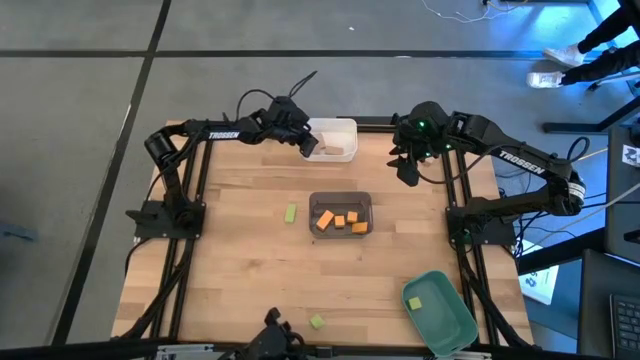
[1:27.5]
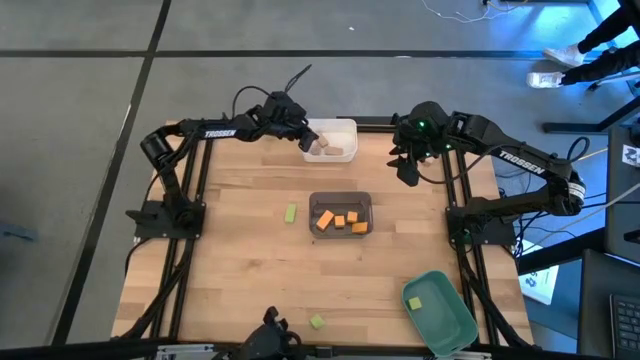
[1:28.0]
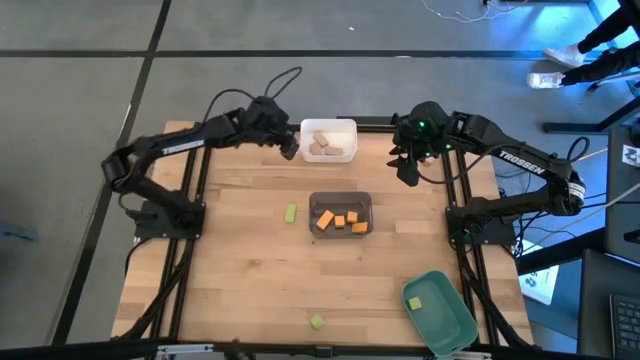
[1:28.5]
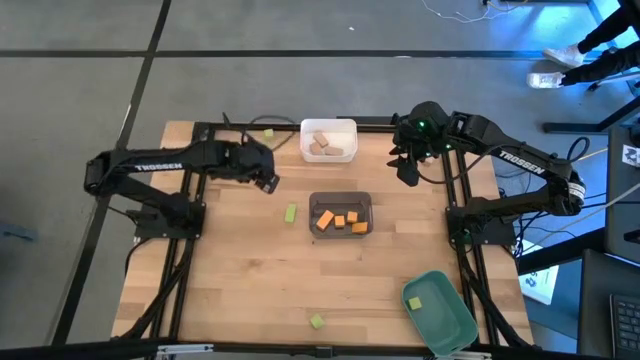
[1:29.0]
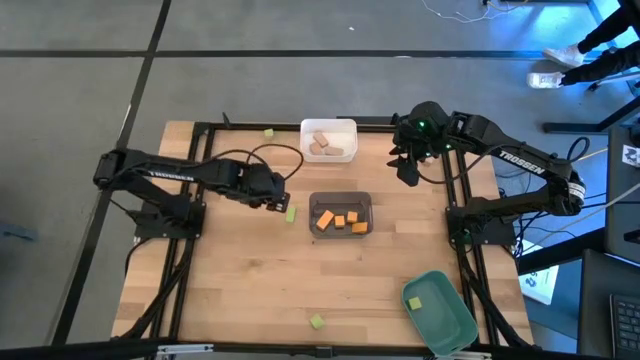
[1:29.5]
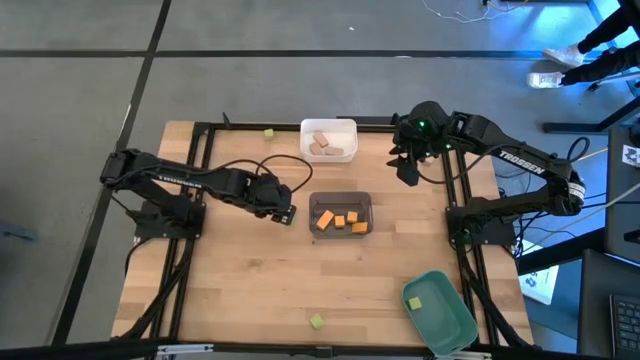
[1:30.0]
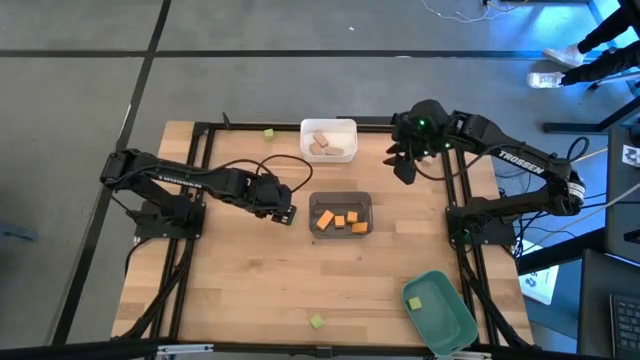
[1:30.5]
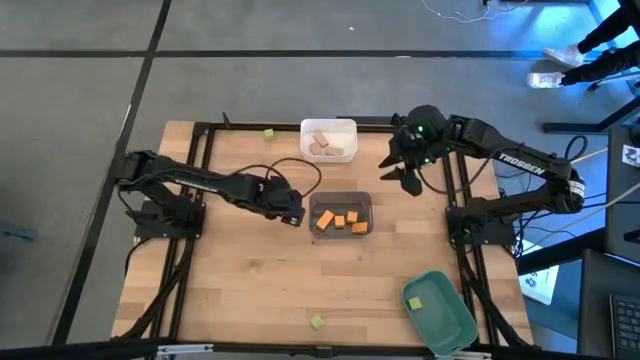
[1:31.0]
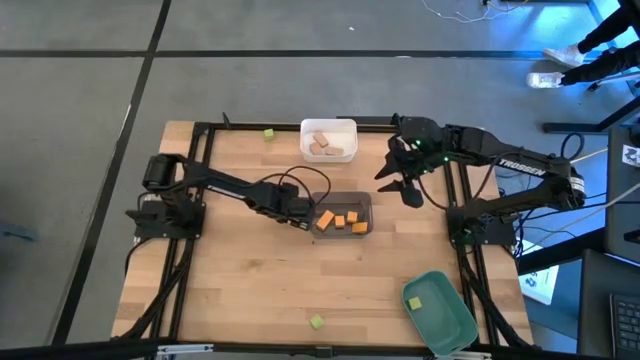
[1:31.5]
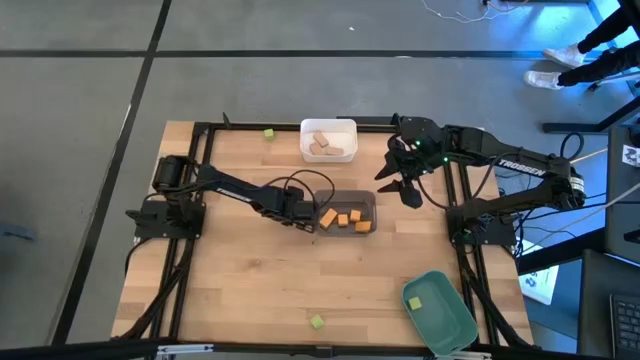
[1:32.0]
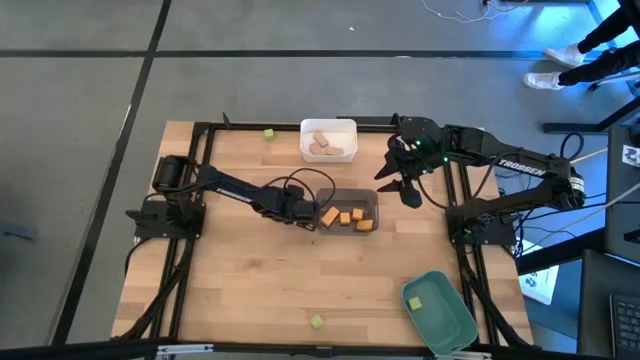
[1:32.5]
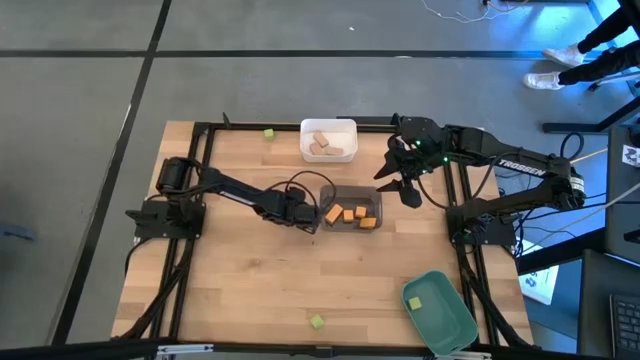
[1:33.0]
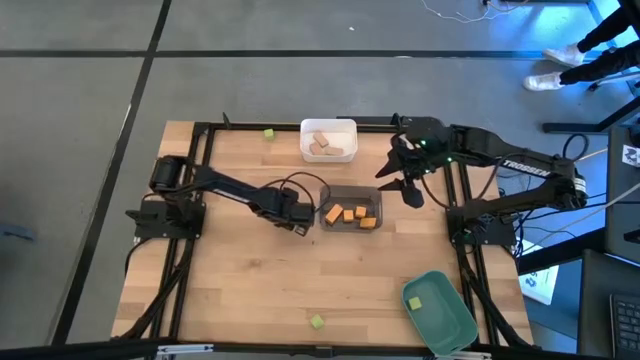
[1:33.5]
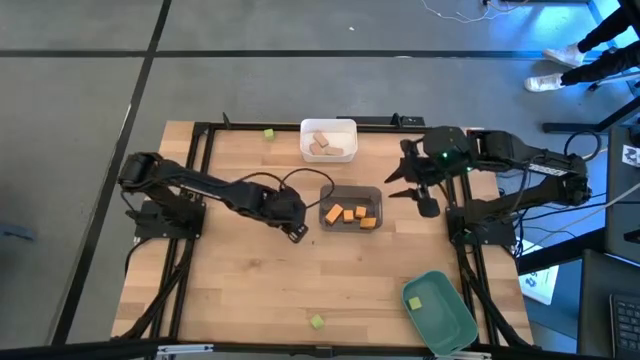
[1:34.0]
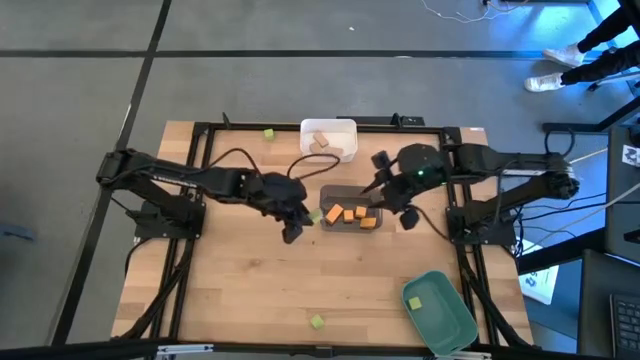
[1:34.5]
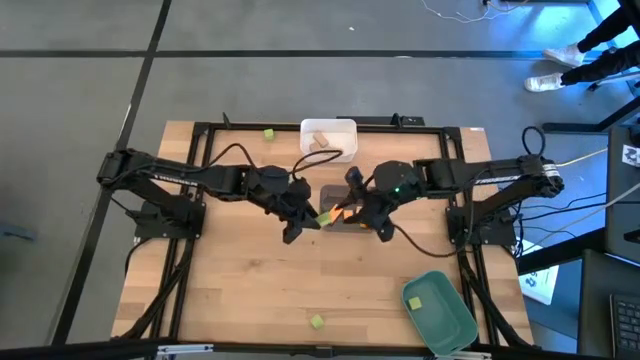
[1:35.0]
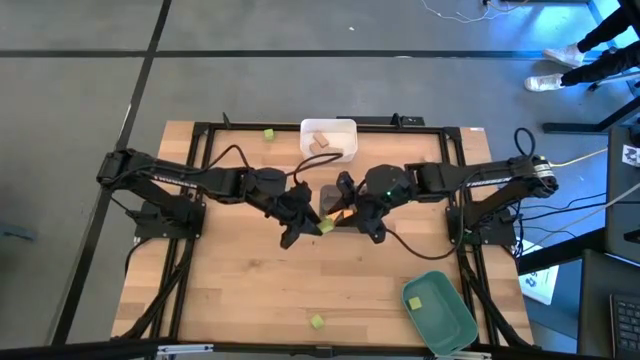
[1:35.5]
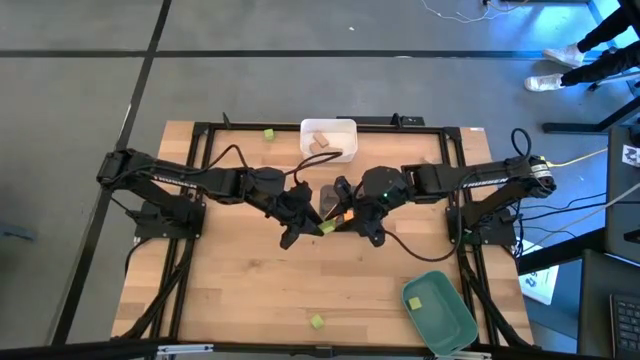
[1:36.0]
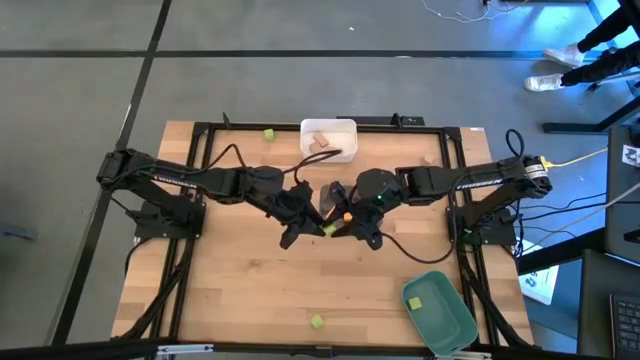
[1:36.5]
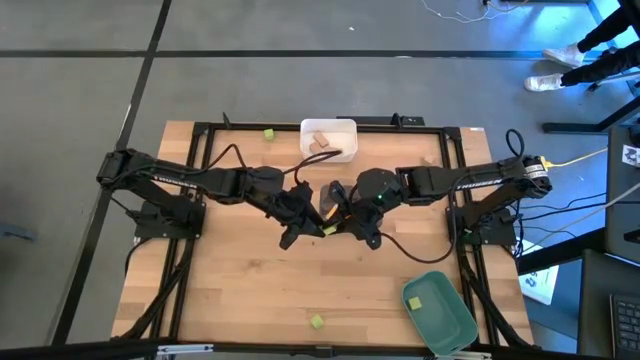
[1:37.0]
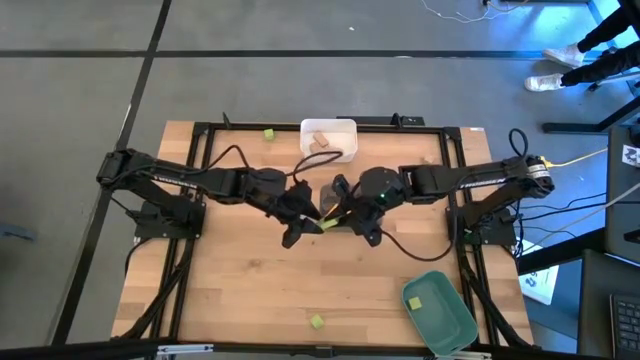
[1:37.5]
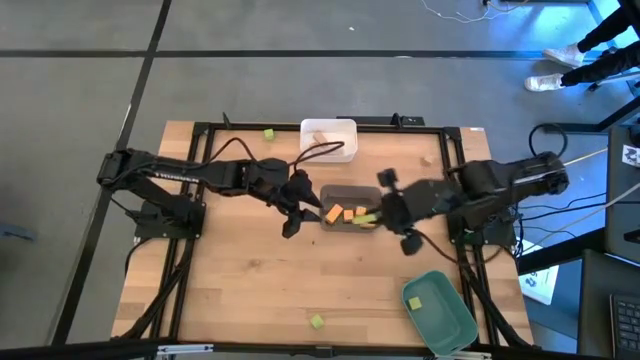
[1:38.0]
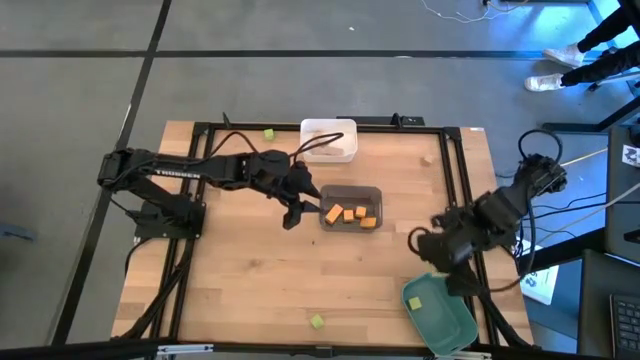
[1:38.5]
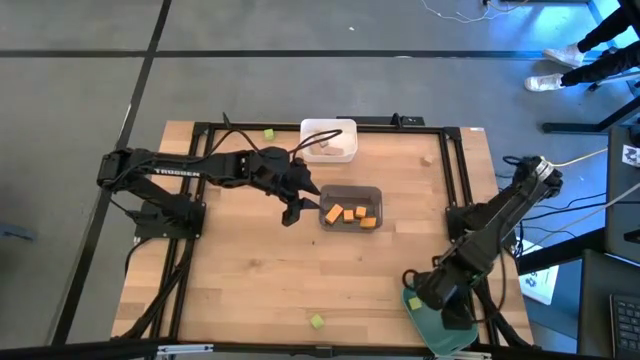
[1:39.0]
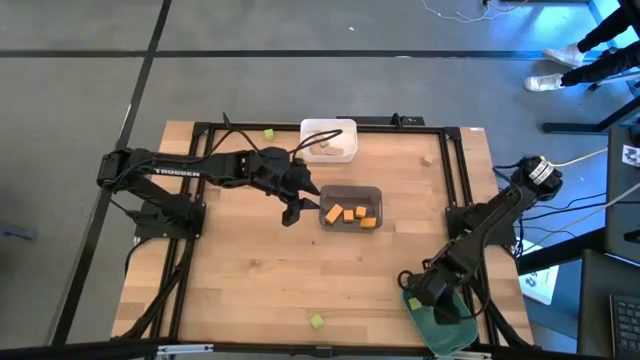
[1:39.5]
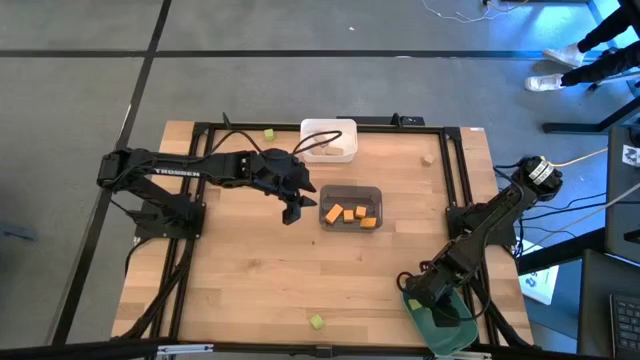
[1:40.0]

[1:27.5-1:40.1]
Task: Sort & place blocks by color
Put the green block into the green bin

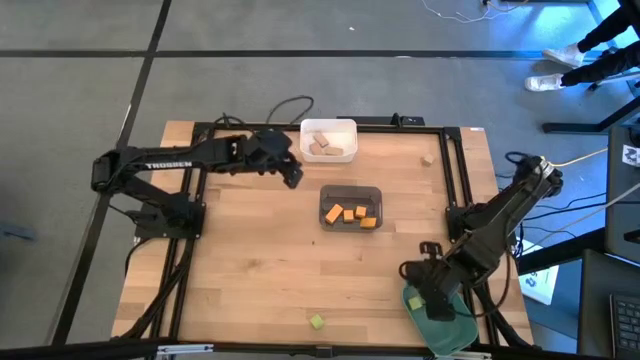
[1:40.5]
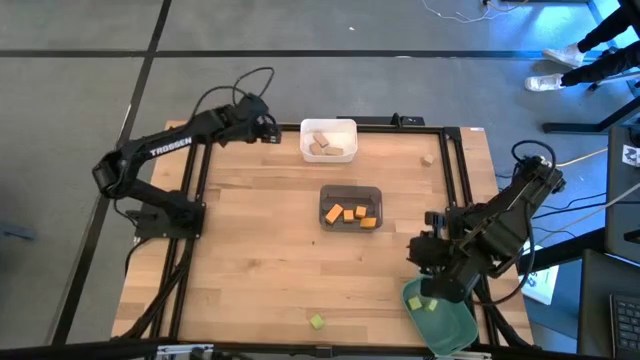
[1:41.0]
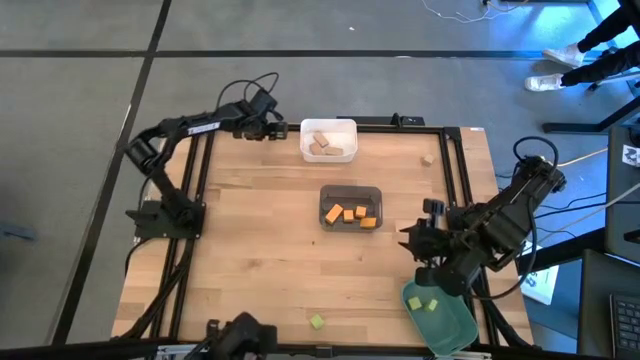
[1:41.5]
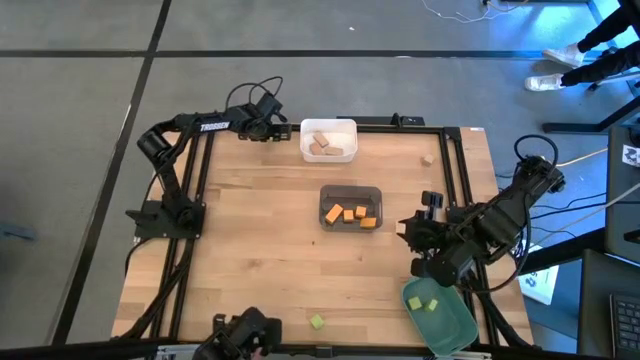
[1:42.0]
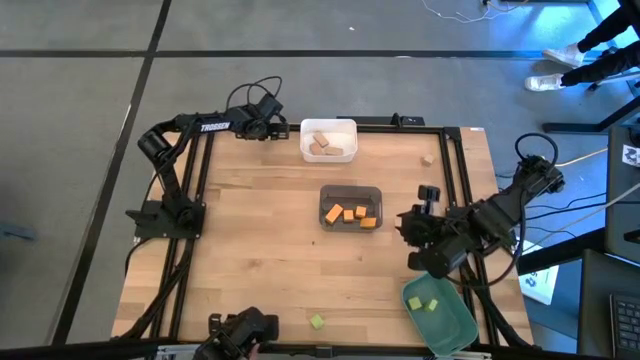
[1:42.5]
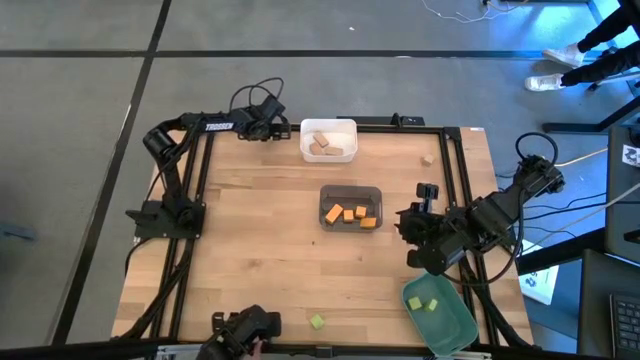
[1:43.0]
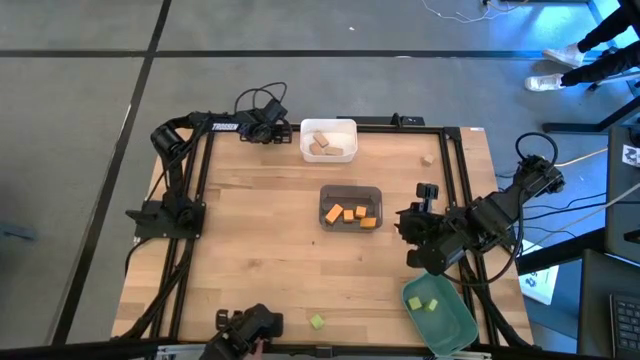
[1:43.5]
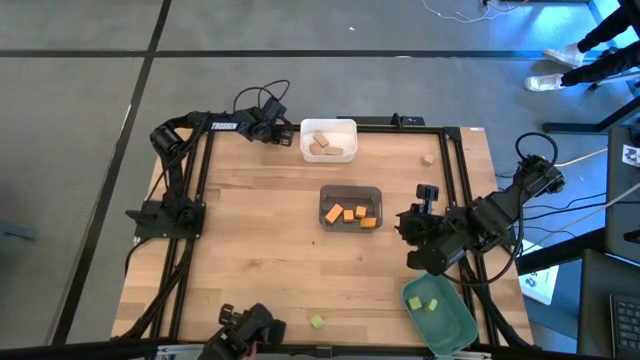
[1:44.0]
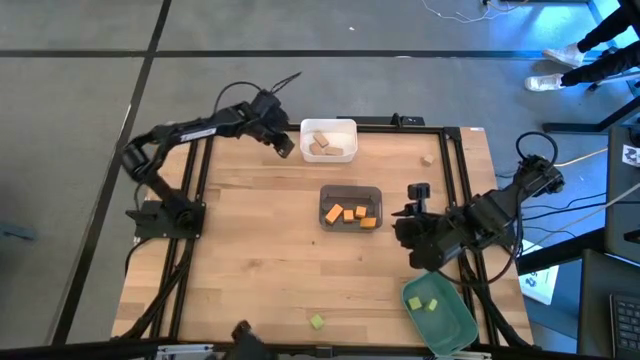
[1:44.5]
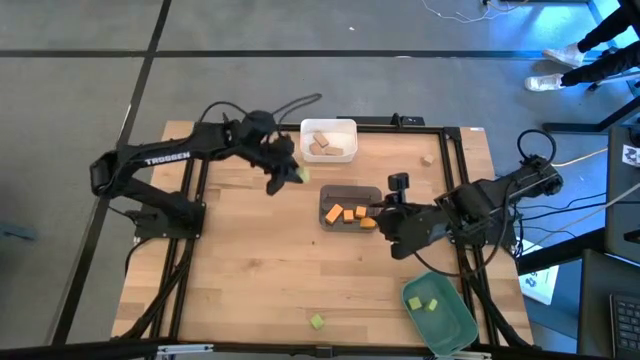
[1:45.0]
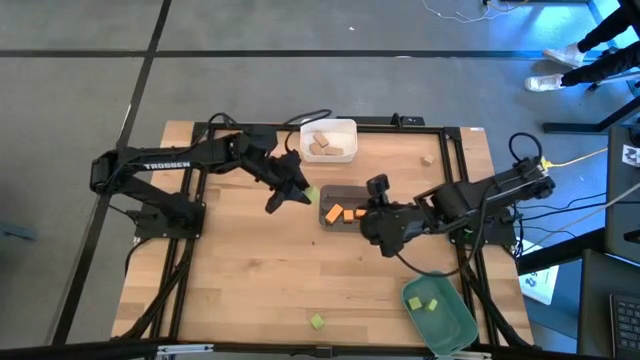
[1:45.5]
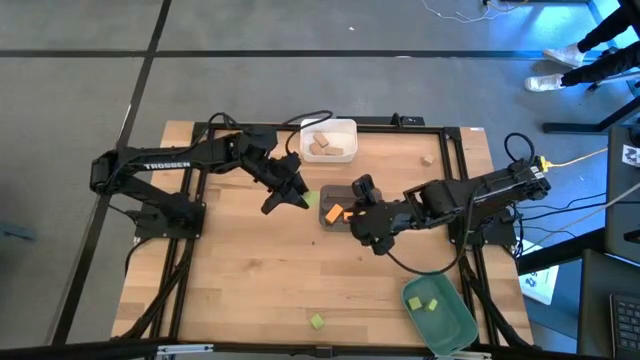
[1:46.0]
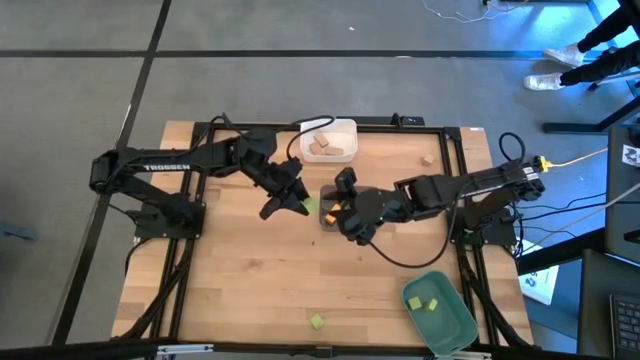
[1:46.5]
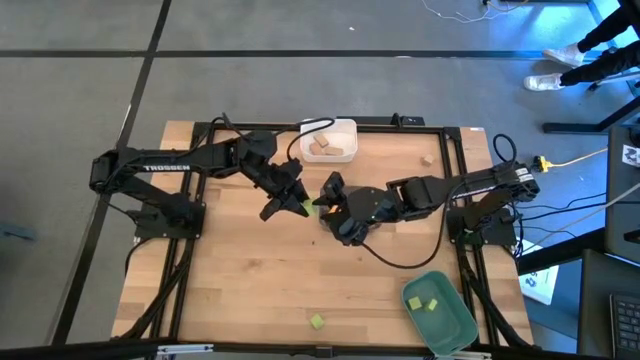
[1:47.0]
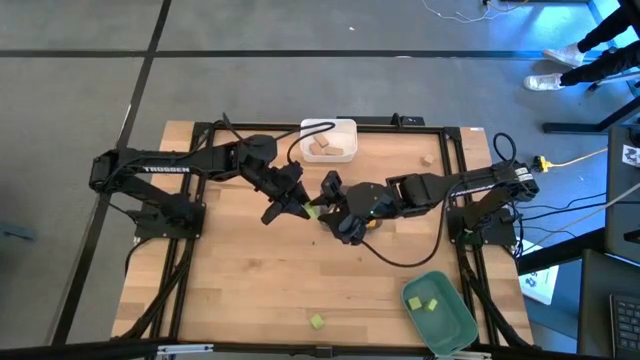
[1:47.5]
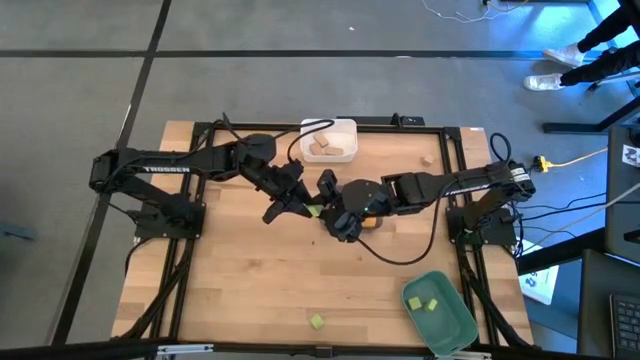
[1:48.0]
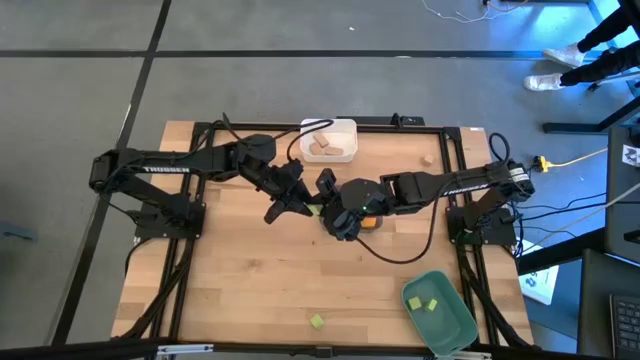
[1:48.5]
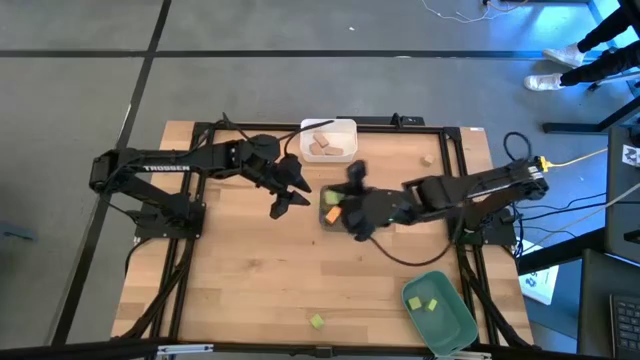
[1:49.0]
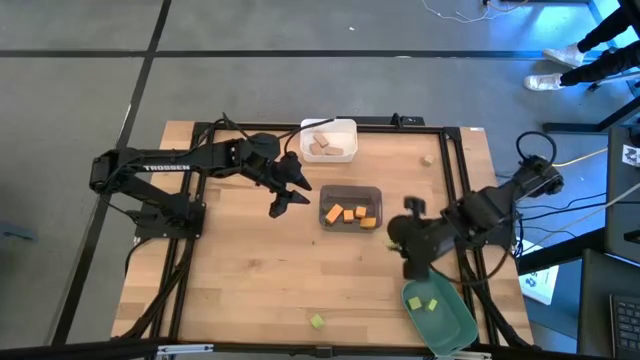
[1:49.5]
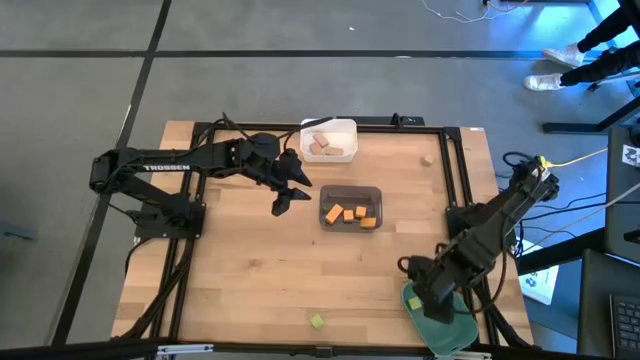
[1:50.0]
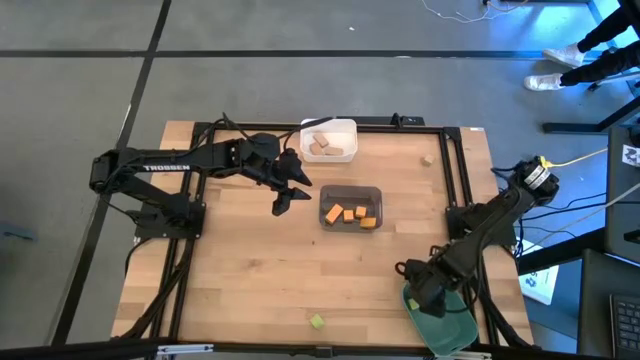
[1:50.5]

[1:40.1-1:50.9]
Put the green block into the green bin
